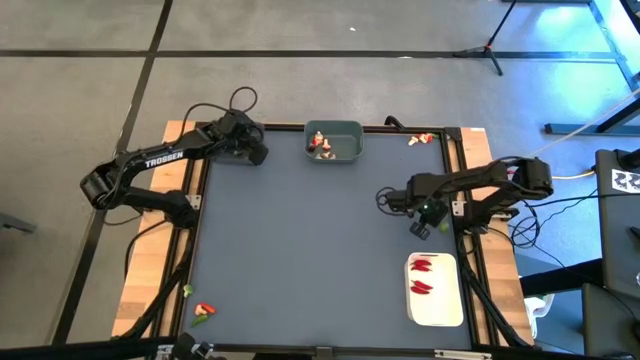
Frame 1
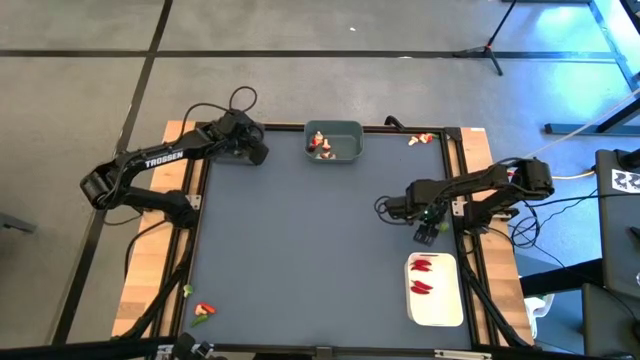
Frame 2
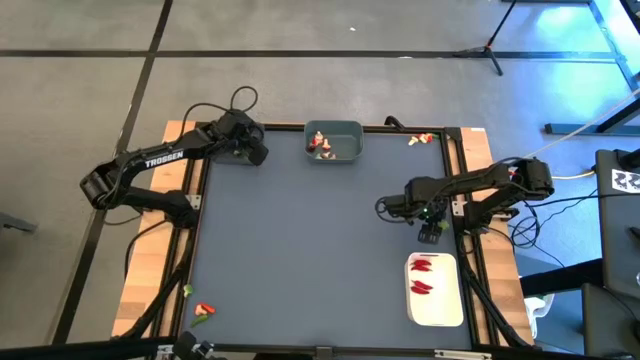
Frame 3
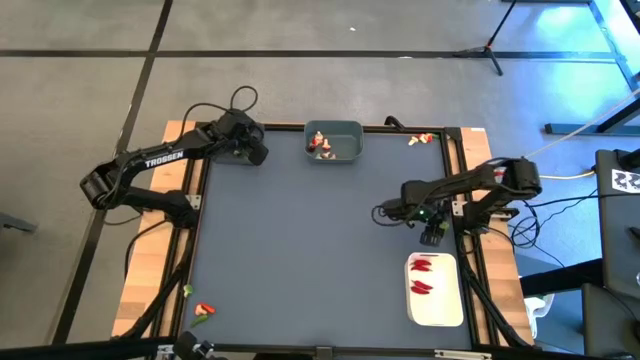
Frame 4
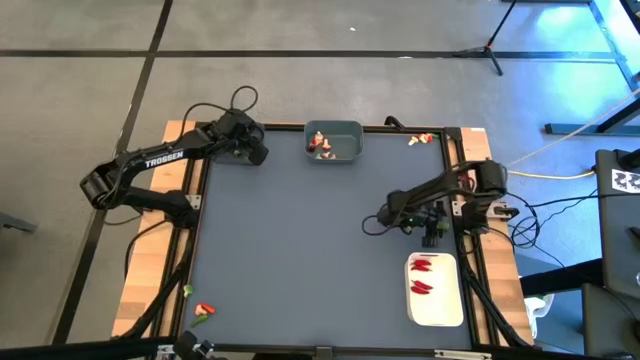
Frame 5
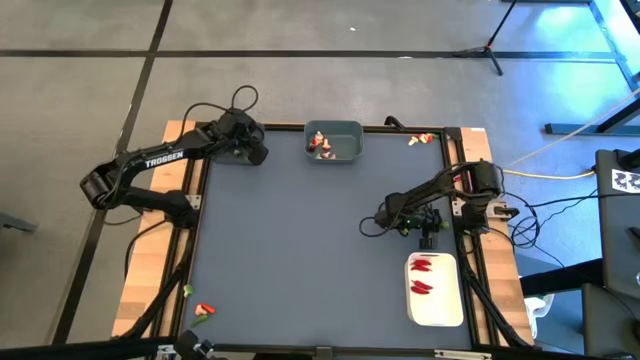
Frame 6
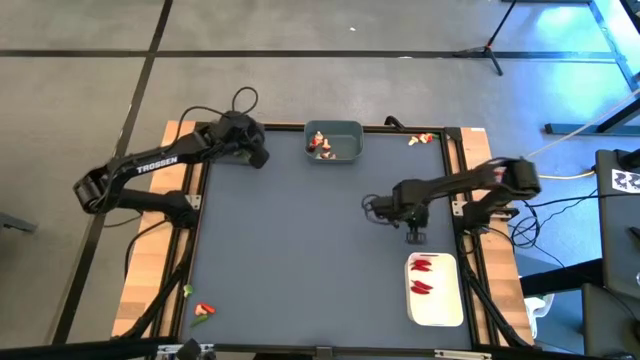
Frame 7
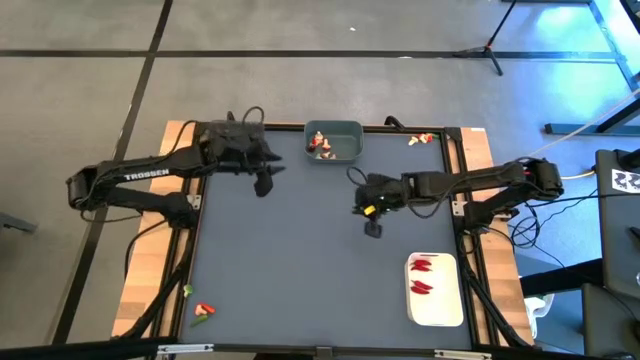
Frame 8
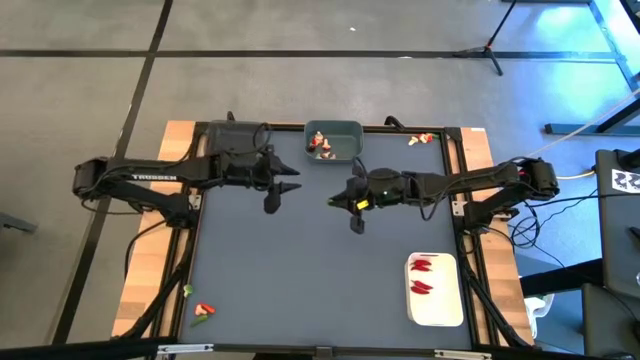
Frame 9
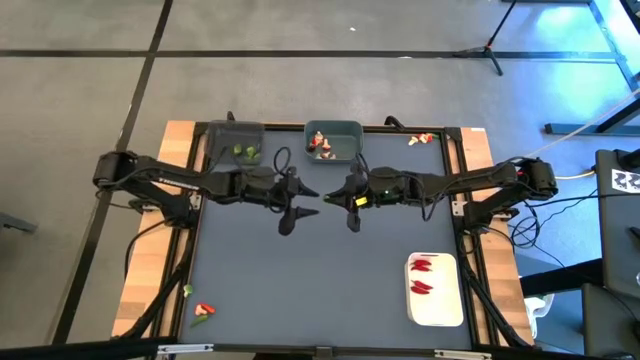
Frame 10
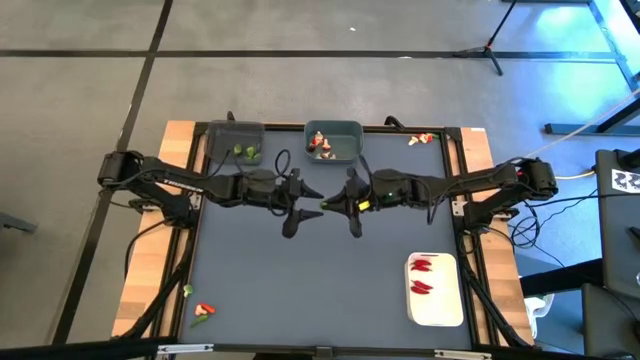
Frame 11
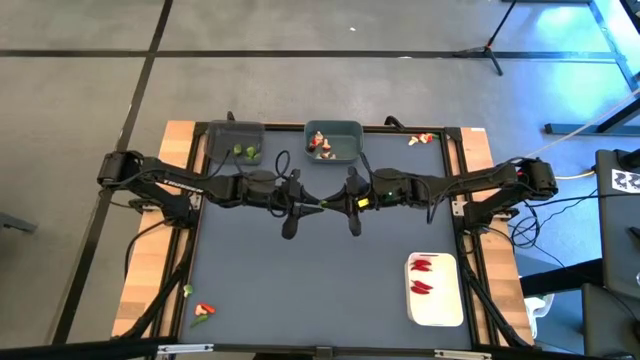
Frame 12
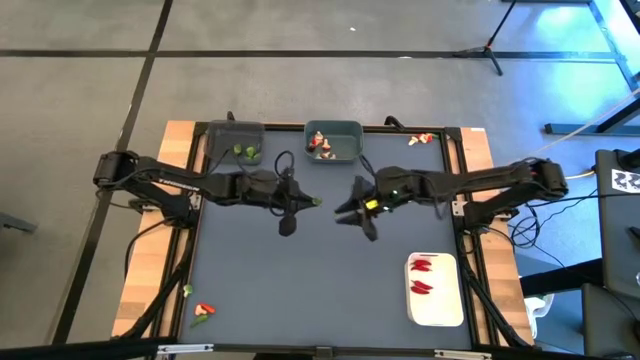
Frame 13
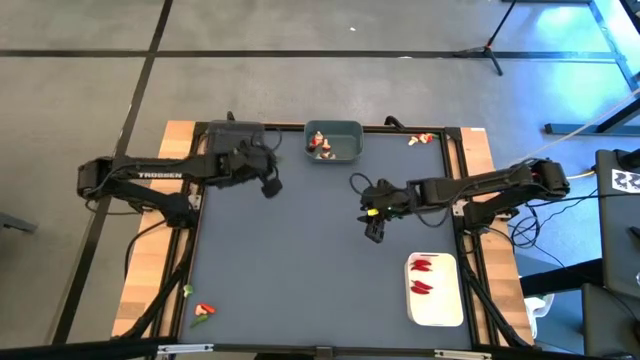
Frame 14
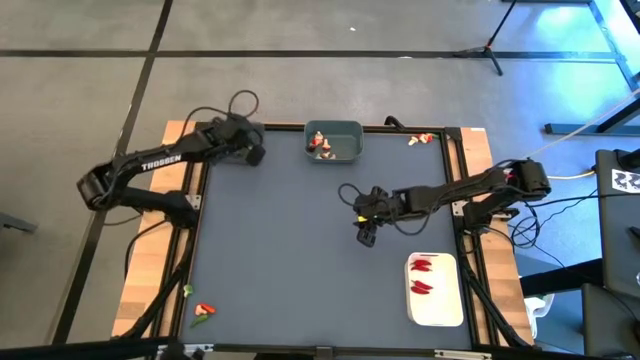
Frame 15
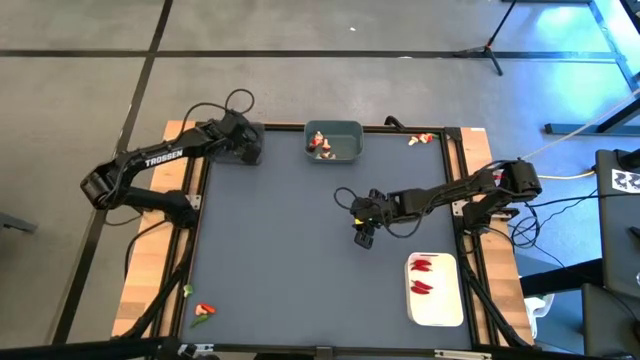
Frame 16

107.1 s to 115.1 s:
Task: Sort produce into baskets
Put the green chili pepper into the black bin

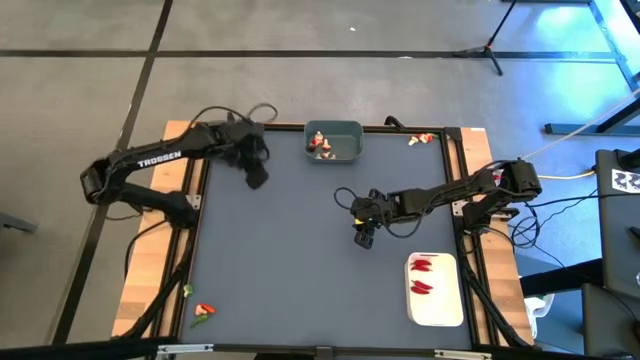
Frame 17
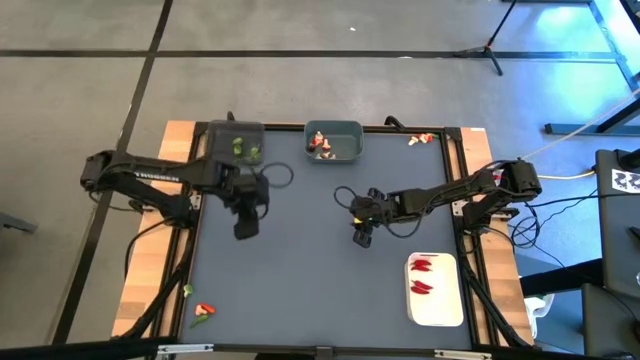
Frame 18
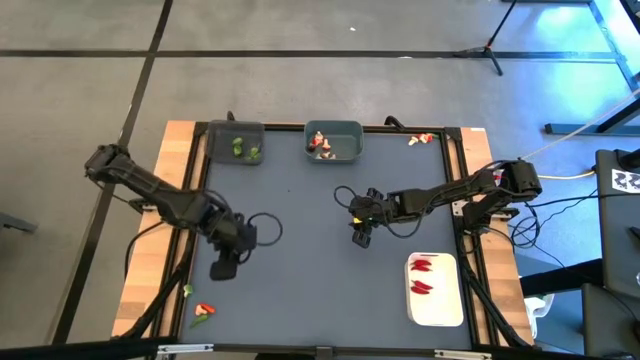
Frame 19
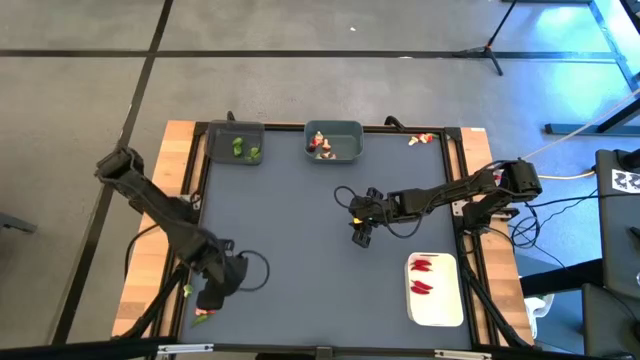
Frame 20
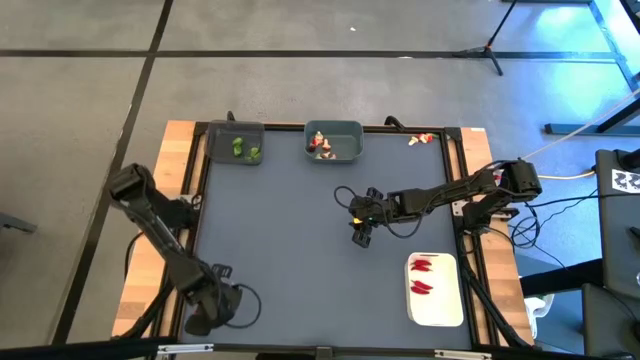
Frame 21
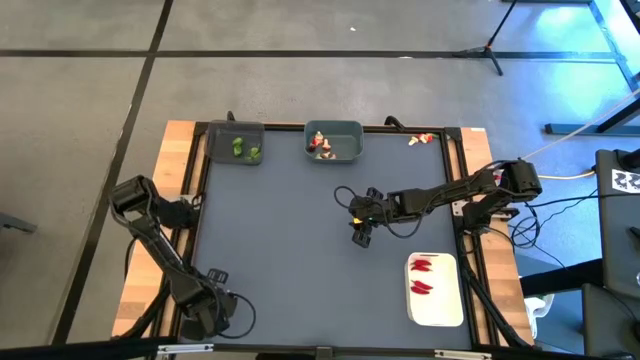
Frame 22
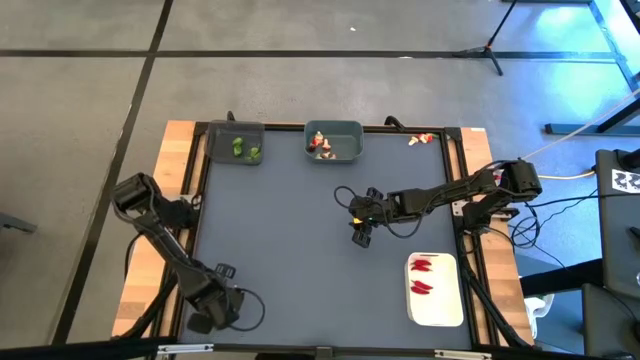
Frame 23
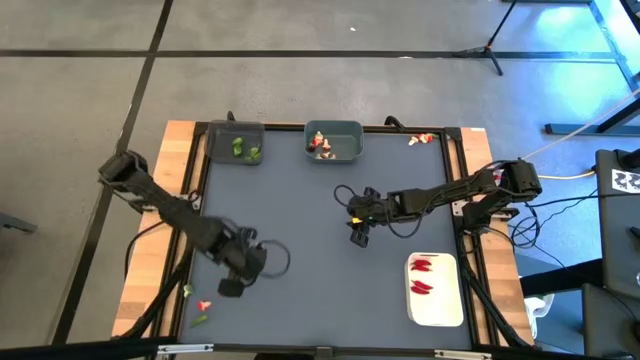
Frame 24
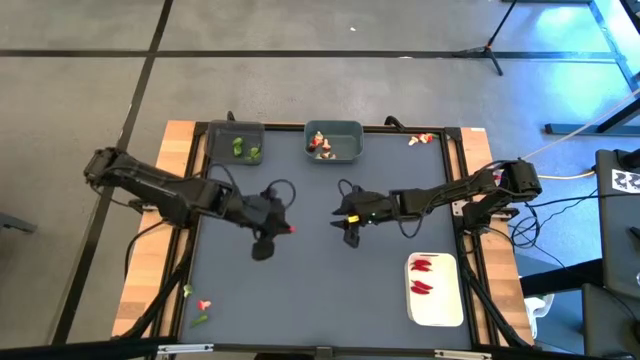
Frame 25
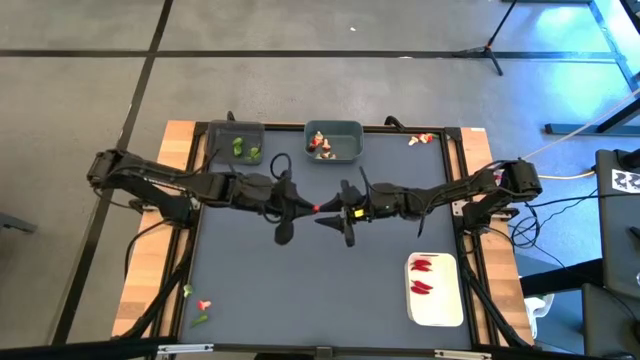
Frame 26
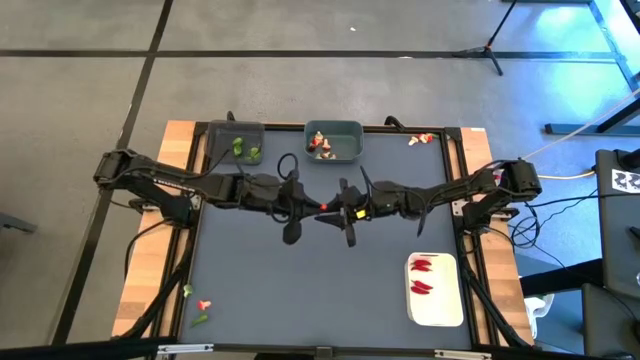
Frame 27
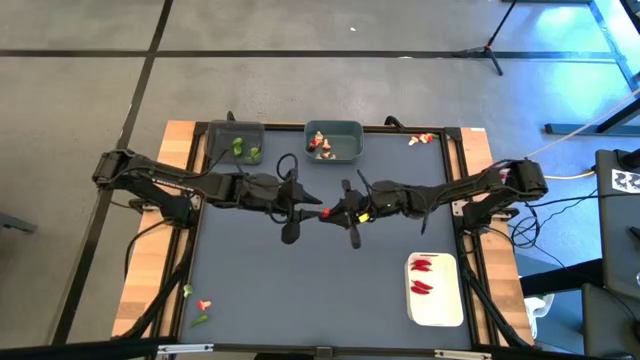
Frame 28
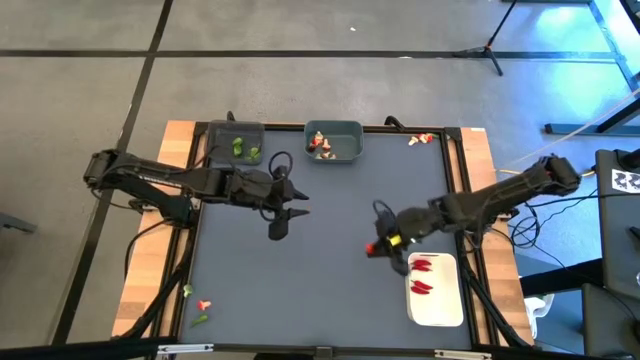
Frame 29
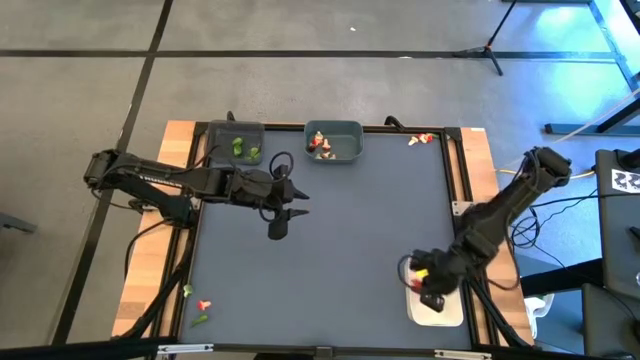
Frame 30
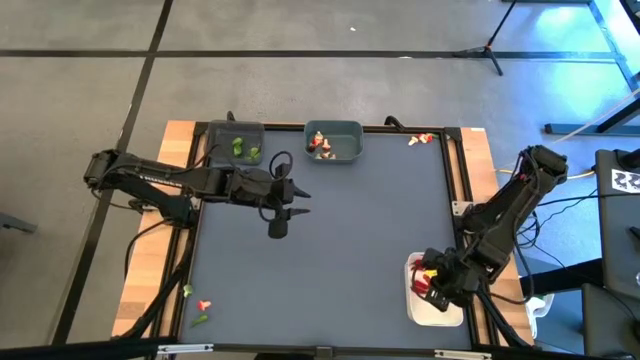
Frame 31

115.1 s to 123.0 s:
Put the orange chili pepper into the white bin

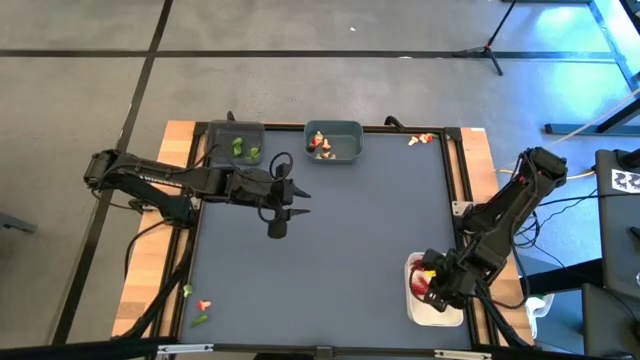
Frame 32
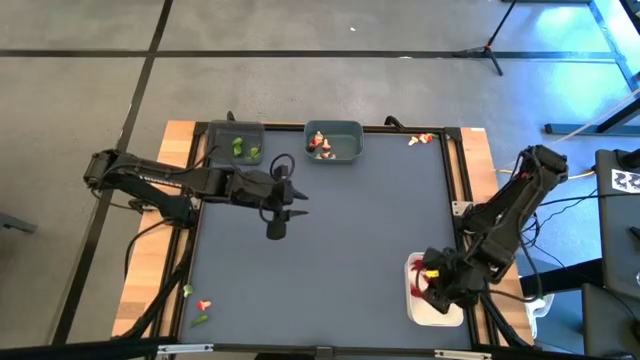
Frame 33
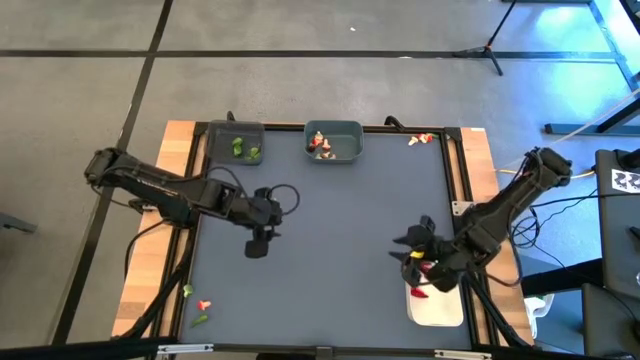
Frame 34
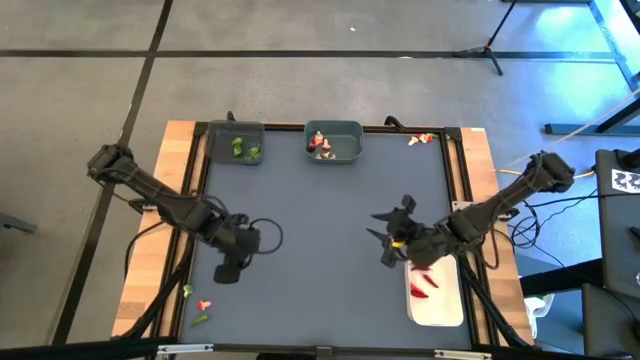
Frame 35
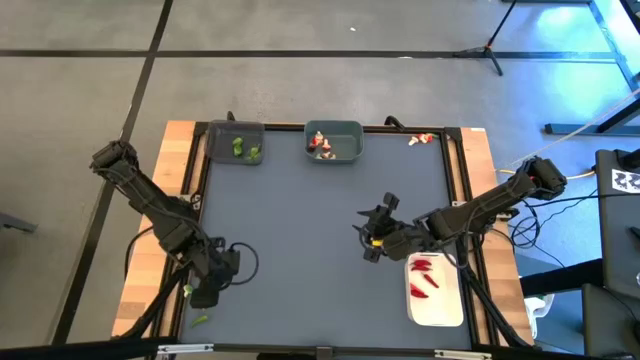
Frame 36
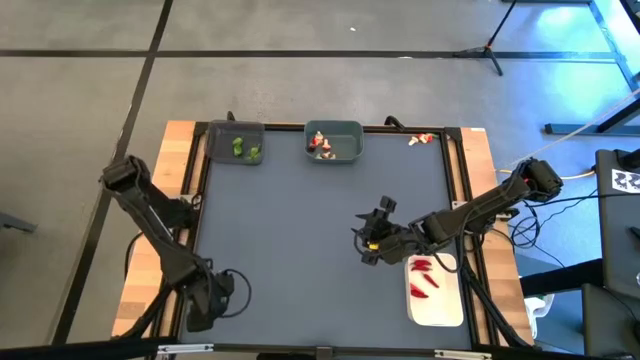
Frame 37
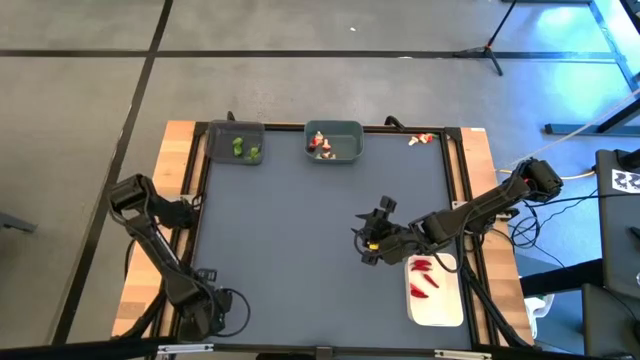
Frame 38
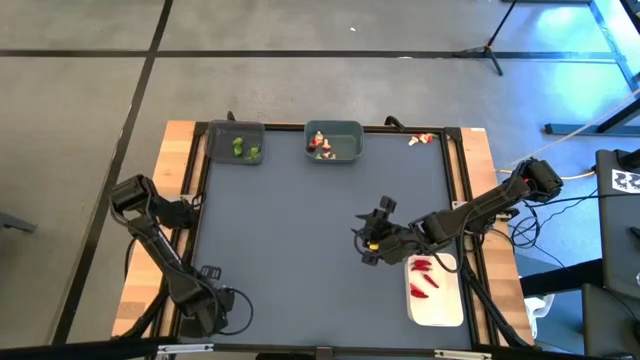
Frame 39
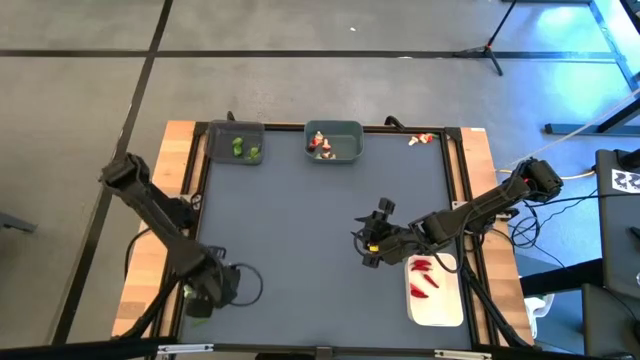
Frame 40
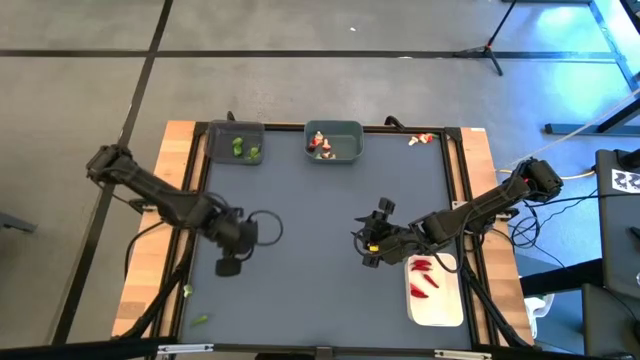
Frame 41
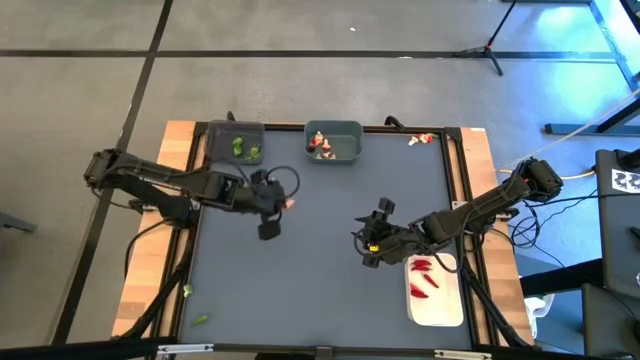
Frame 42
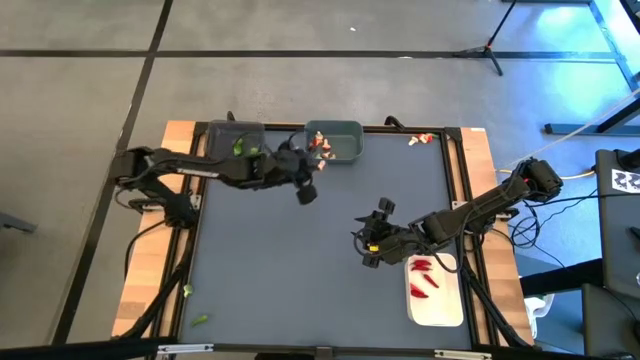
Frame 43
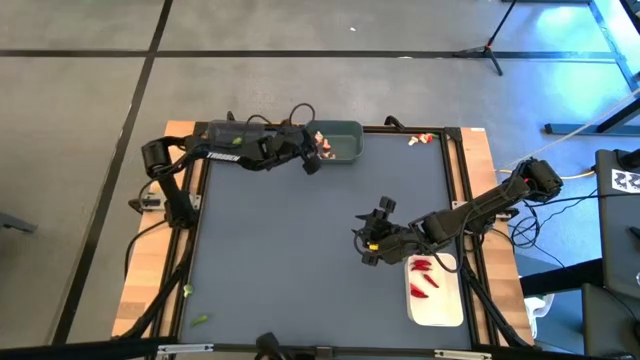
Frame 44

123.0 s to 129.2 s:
Put the red mushroom into the blue bin
